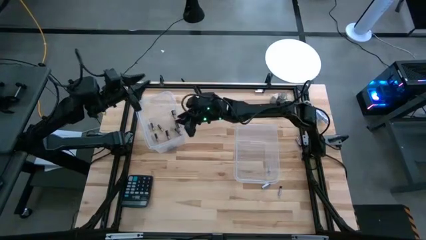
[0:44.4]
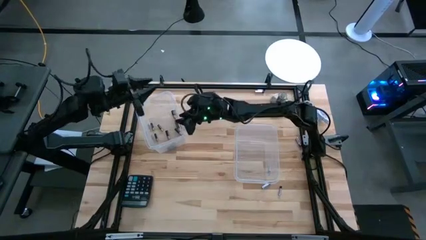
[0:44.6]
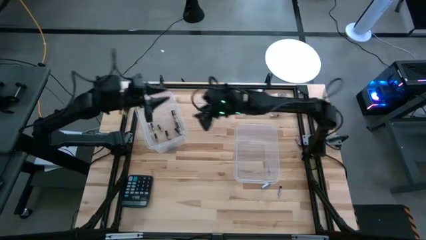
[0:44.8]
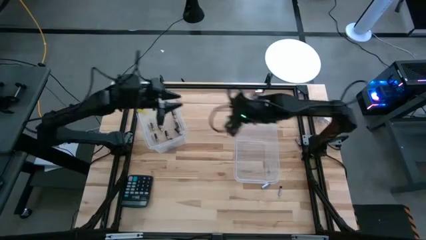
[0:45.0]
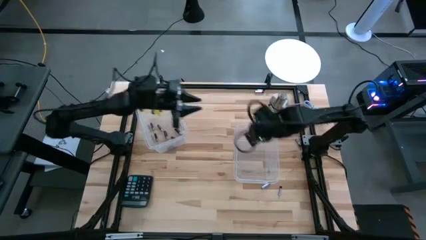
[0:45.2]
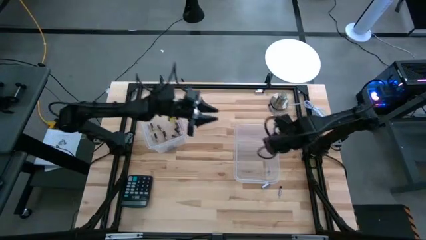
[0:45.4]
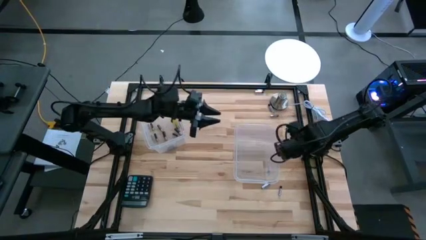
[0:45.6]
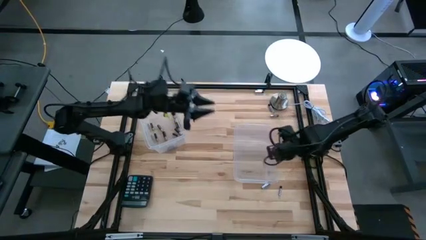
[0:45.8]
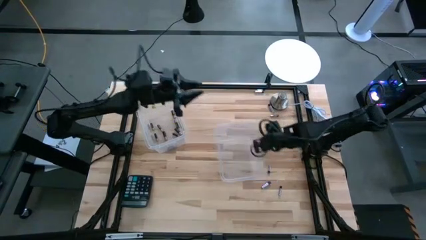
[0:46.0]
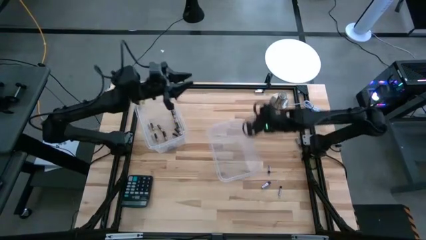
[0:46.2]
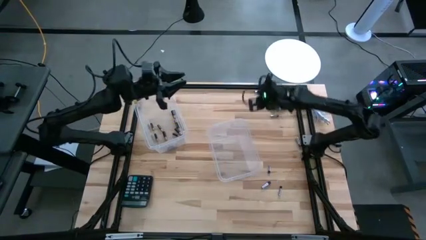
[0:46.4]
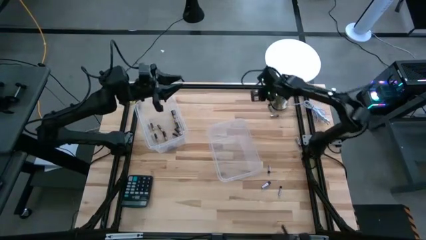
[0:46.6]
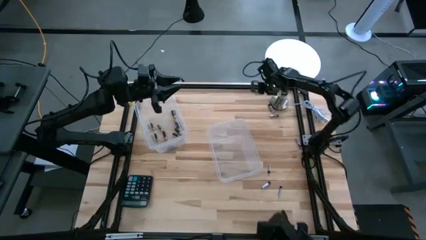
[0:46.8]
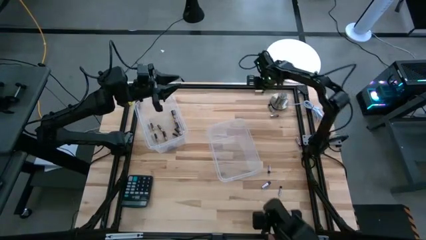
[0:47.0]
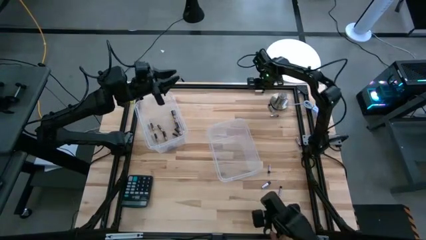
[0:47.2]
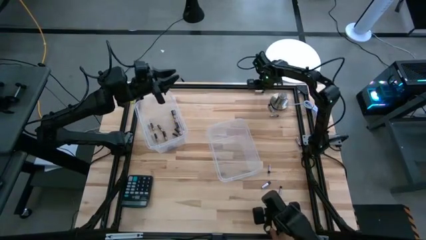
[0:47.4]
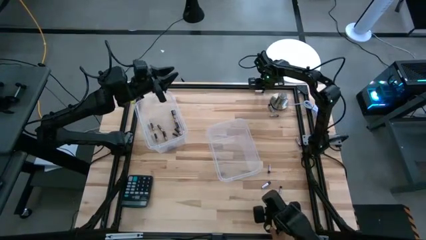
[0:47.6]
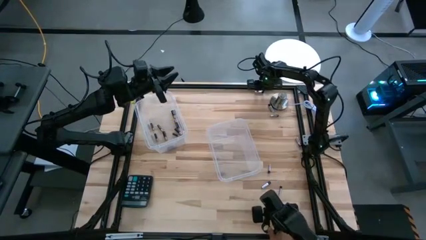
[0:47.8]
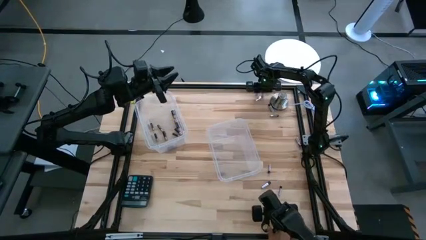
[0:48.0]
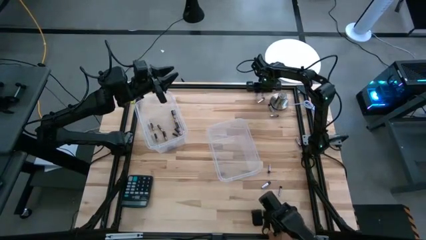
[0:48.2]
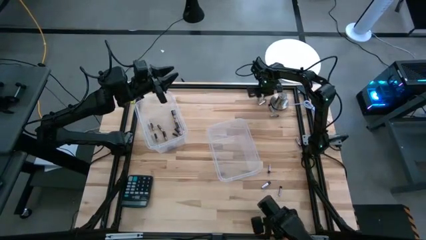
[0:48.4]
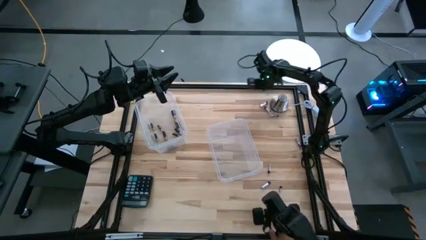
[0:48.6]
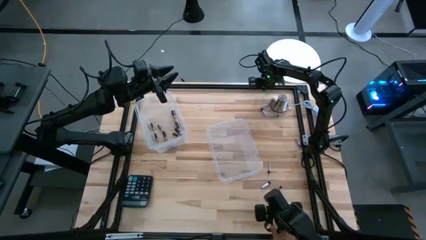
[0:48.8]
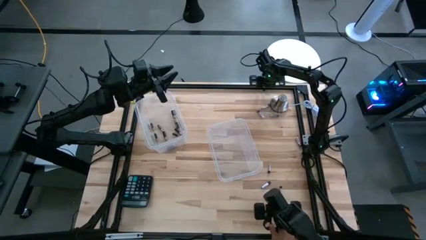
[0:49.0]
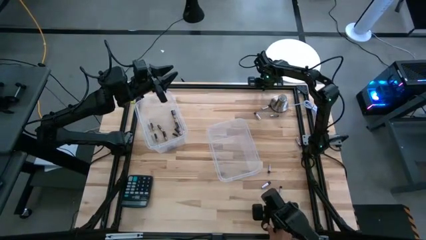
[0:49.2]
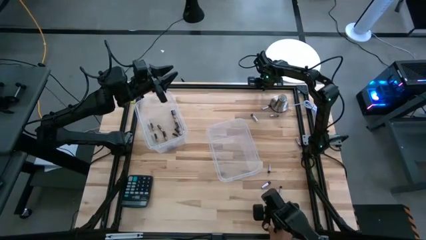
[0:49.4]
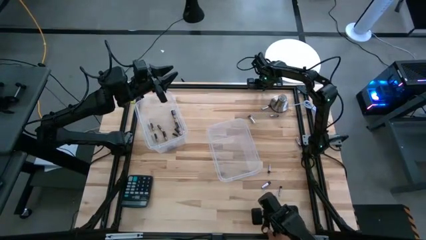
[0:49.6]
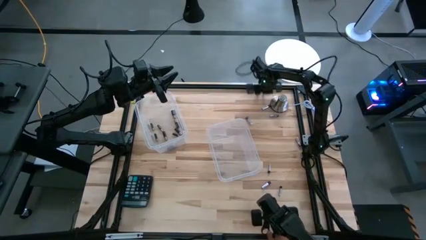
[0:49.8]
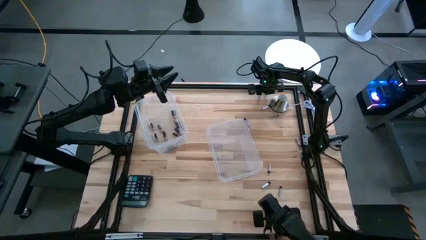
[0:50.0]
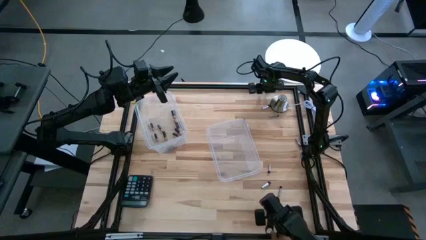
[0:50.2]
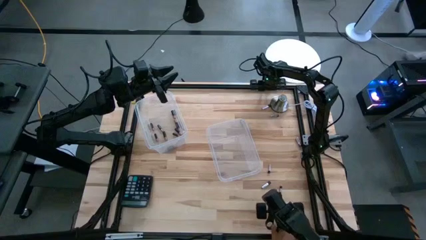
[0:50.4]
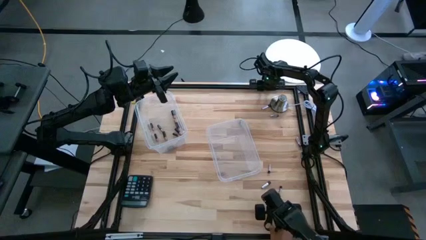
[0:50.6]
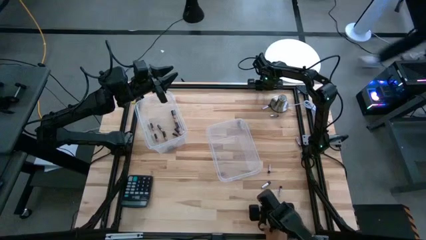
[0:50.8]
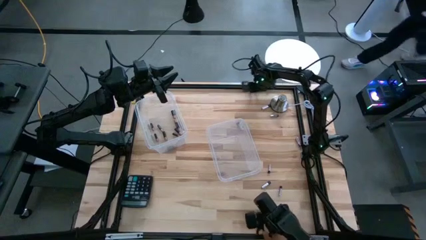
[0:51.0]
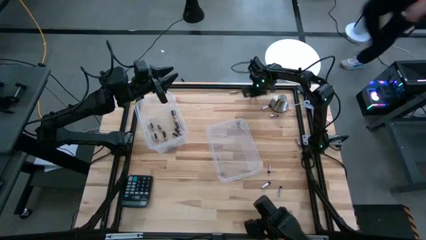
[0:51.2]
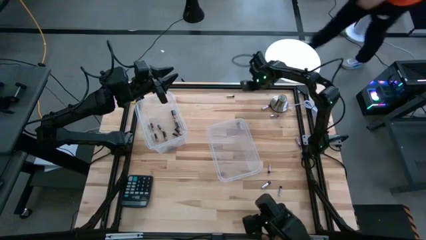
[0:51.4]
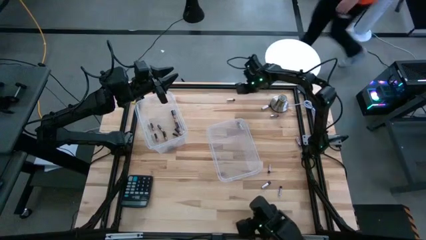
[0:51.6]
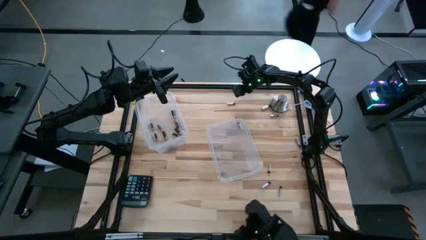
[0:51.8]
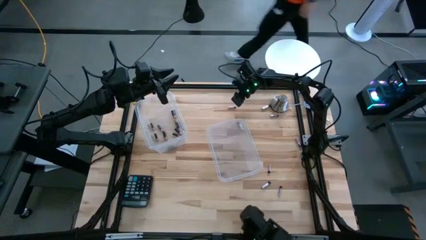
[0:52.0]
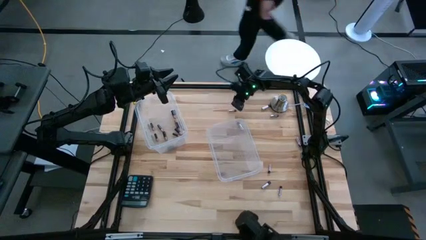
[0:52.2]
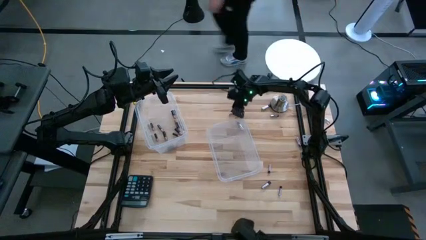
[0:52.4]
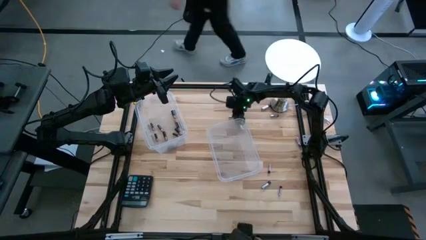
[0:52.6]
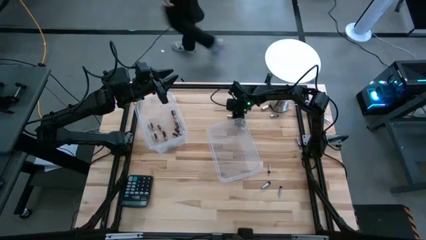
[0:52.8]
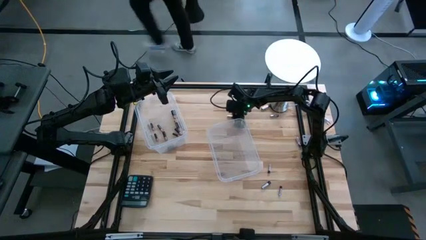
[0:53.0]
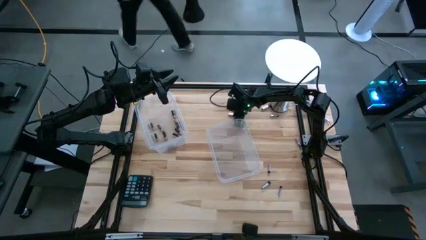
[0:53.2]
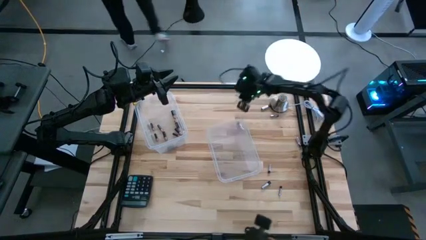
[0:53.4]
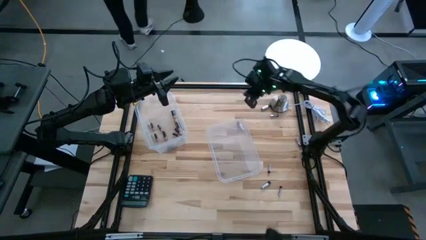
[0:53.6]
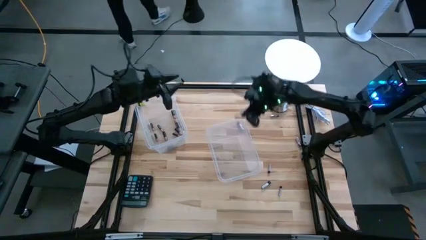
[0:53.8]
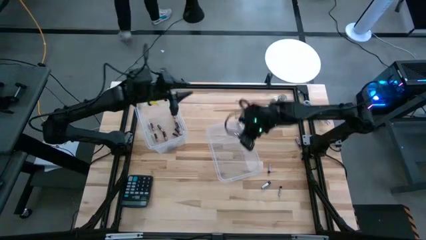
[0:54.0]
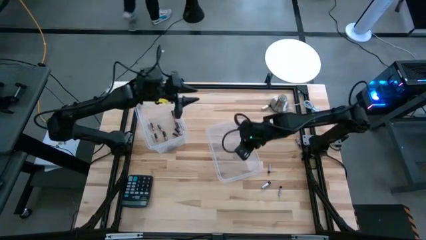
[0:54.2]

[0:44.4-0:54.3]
Task: Sort batteries
Put the silver battery into the right transparent bin

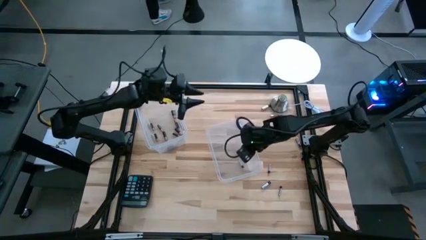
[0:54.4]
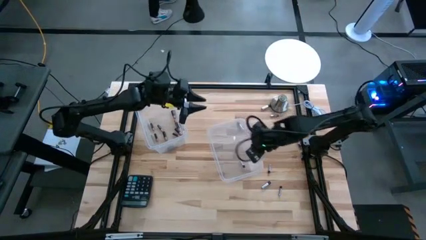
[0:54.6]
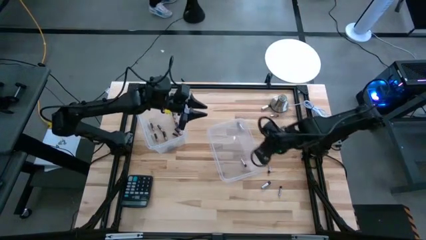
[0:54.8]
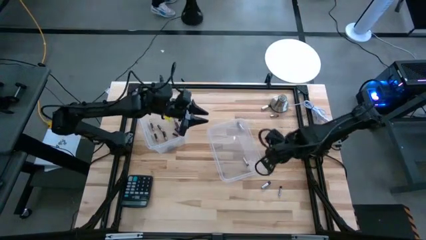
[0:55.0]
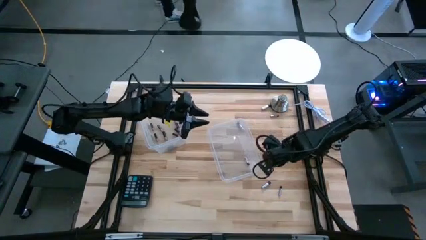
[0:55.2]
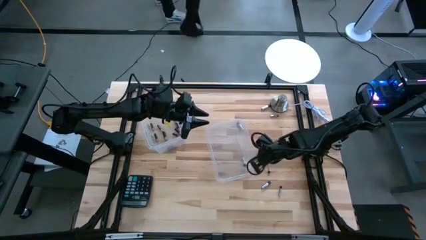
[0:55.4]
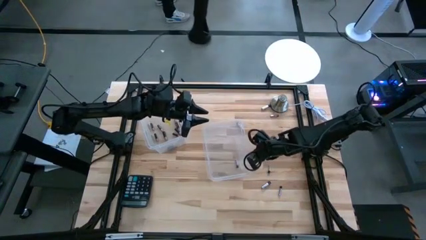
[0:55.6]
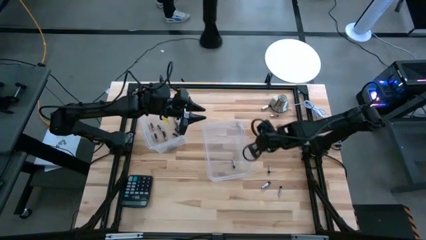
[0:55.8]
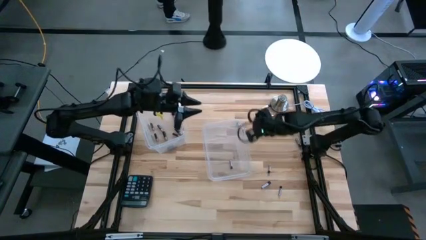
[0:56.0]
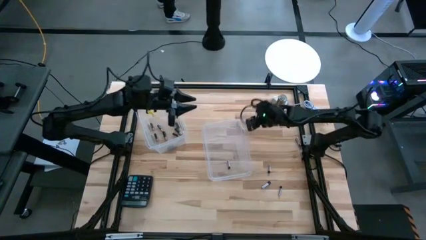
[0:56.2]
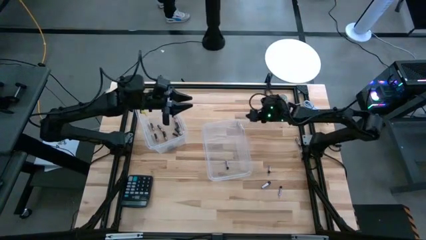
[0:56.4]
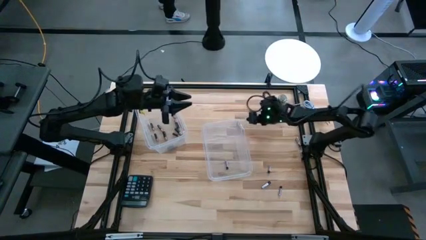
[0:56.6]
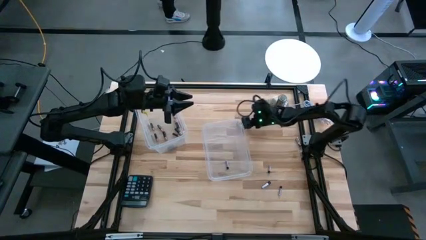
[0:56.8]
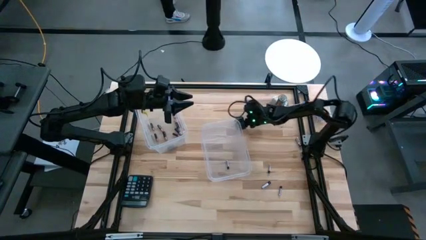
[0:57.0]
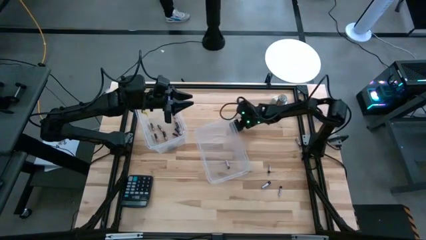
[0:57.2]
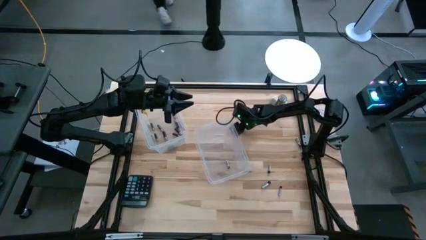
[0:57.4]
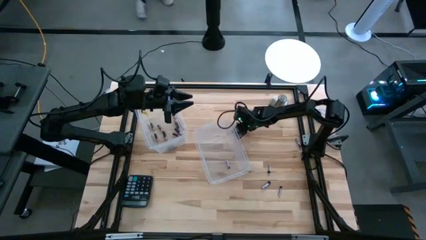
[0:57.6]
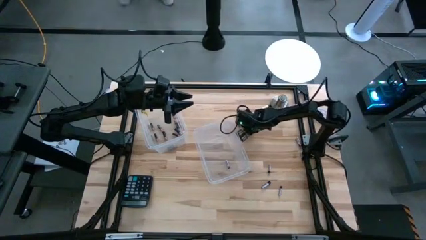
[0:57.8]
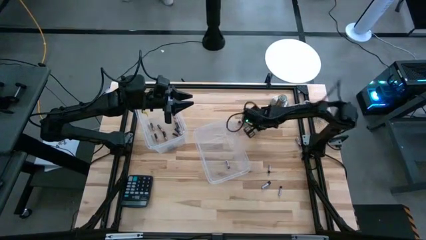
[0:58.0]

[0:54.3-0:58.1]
Put the silver battery into the right transparent bin

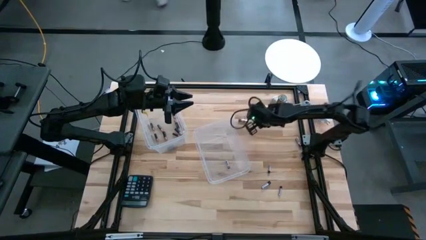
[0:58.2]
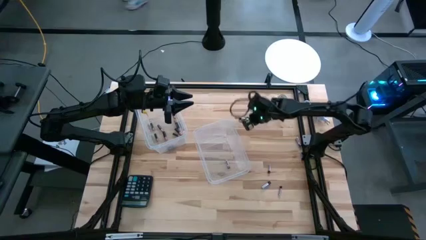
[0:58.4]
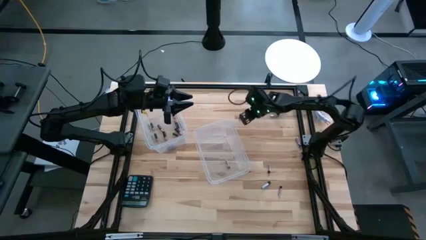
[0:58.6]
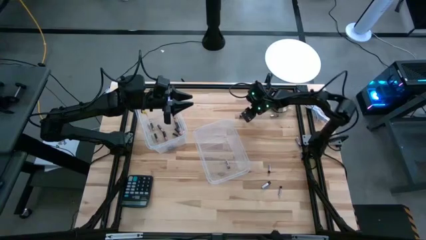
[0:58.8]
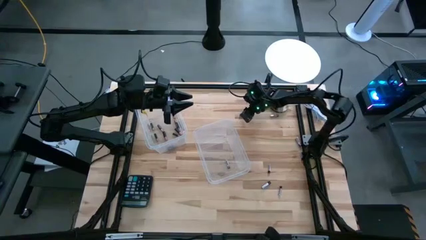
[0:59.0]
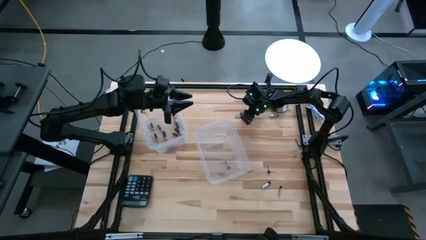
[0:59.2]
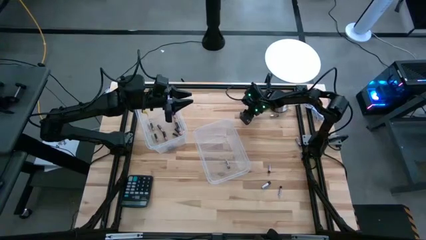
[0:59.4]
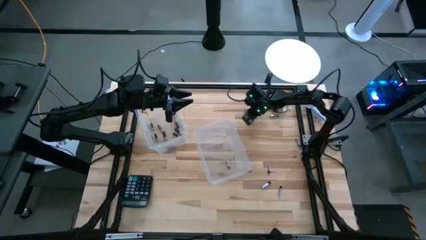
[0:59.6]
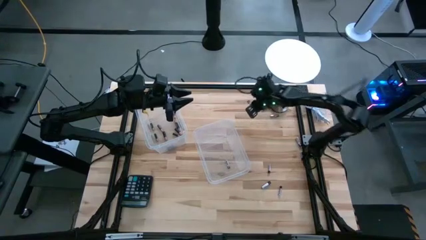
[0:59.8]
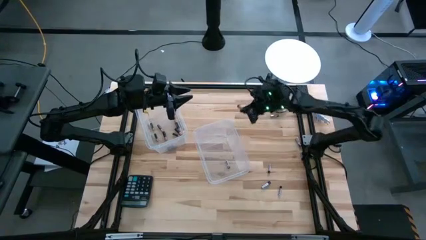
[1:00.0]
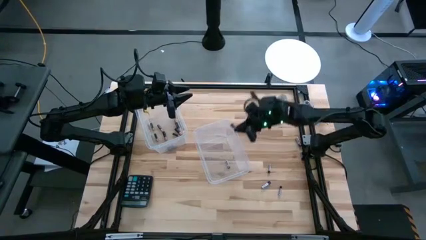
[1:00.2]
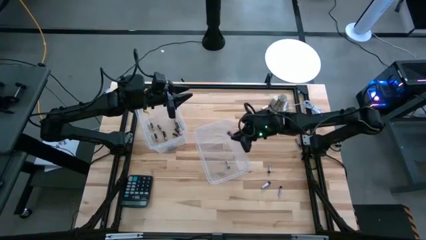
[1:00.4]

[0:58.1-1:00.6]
Put the silver battery into the right transparent bin

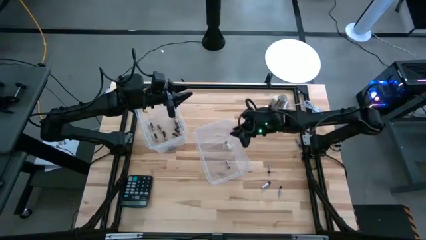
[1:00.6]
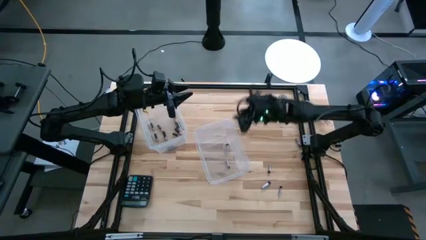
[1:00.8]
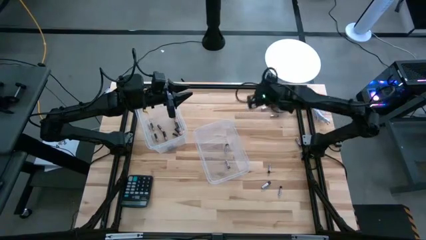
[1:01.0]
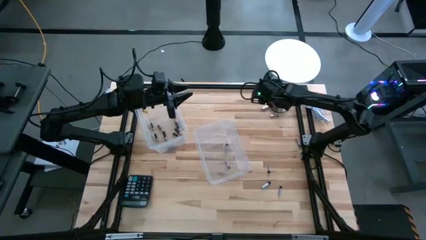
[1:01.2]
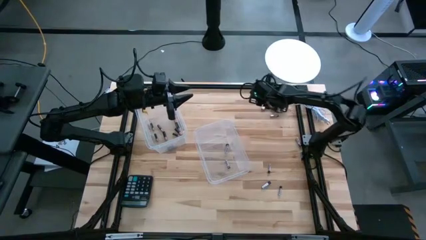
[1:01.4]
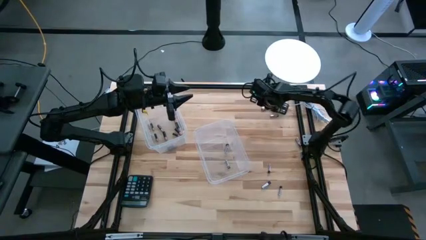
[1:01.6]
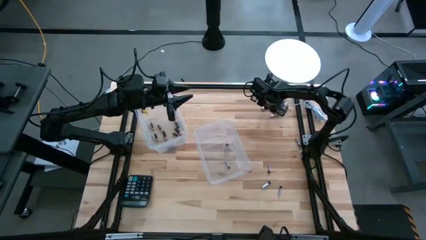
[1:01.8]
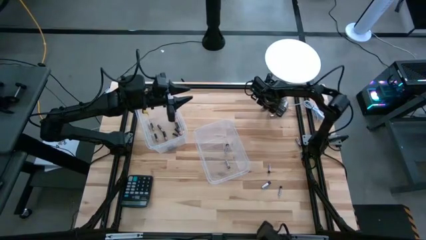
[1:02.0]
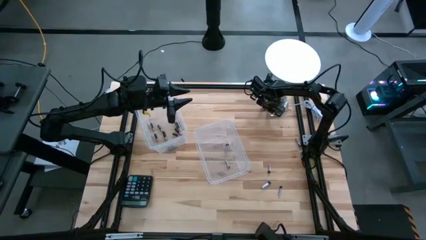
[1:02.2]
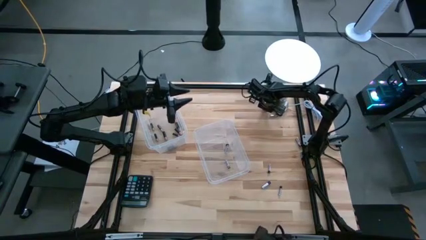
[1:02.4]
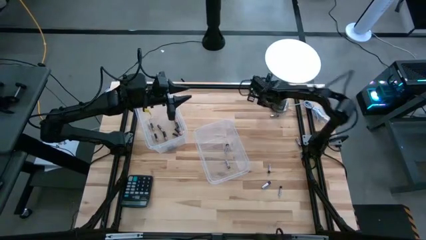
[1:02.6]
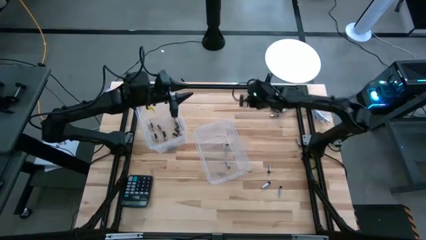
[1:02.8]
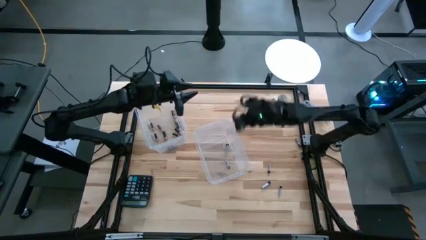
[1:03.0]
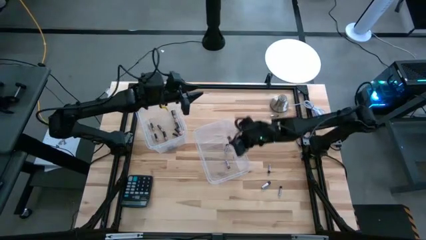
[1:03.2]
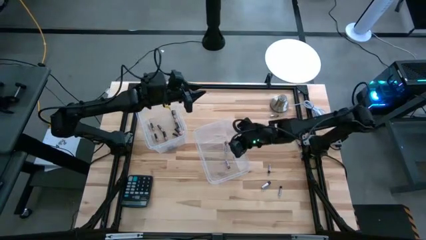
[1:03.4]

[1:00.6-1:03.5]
Put the silver battery into the right transparent bin
